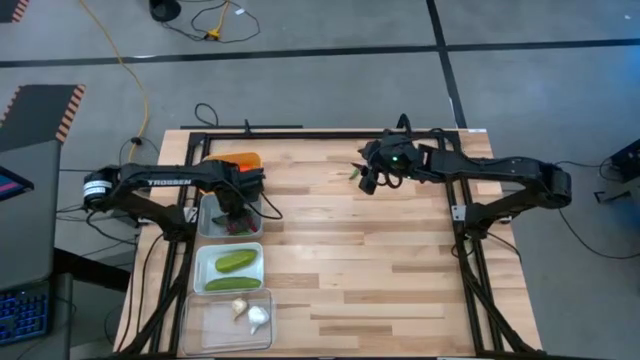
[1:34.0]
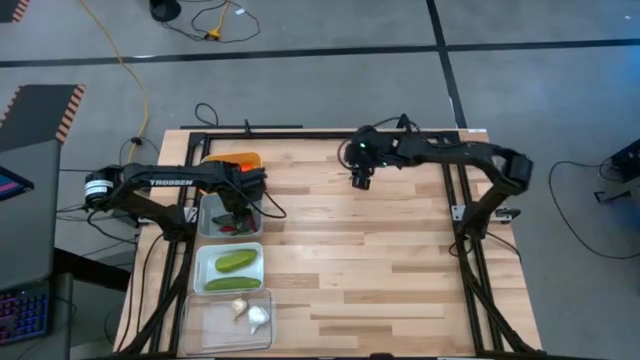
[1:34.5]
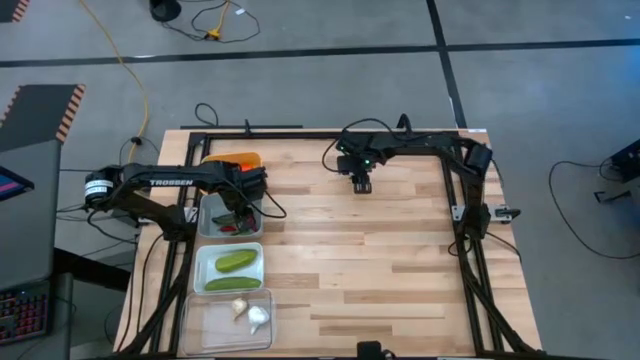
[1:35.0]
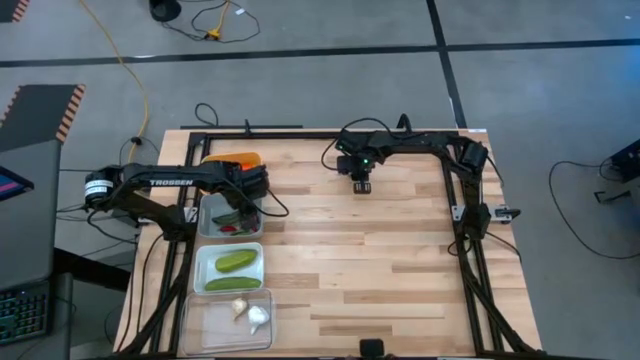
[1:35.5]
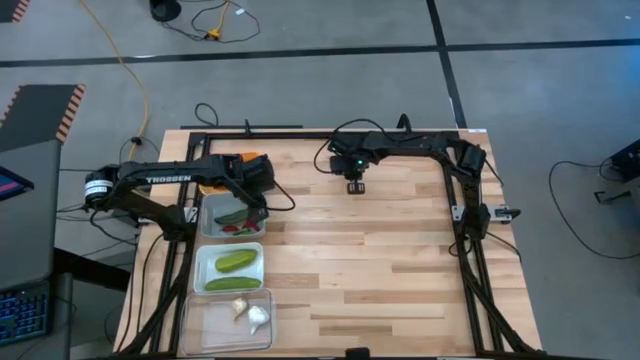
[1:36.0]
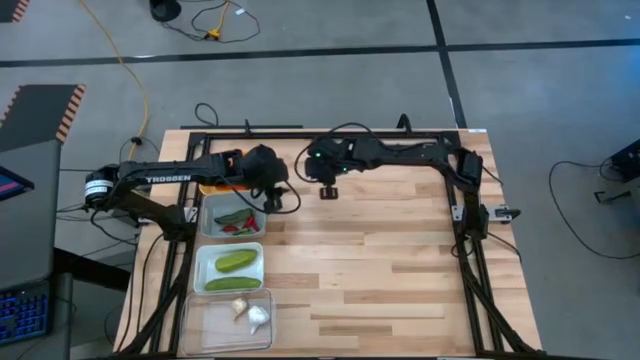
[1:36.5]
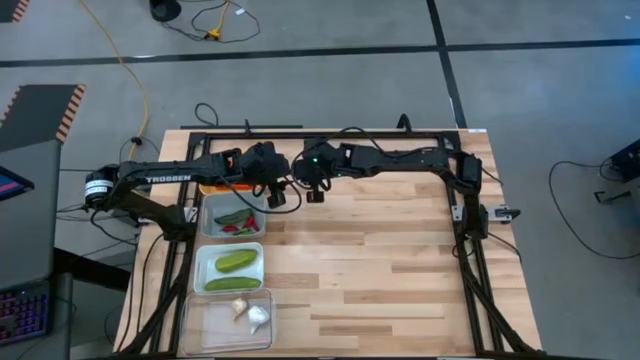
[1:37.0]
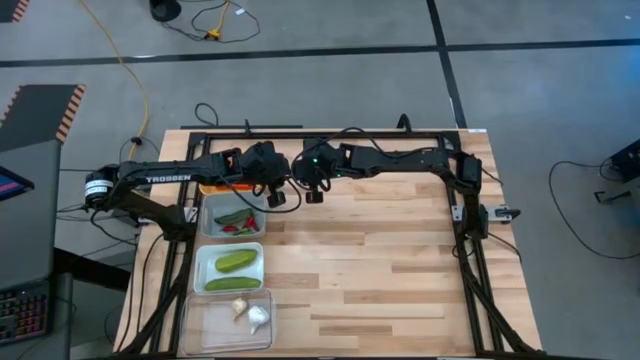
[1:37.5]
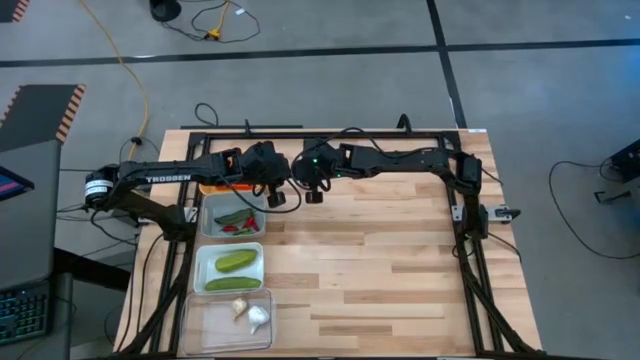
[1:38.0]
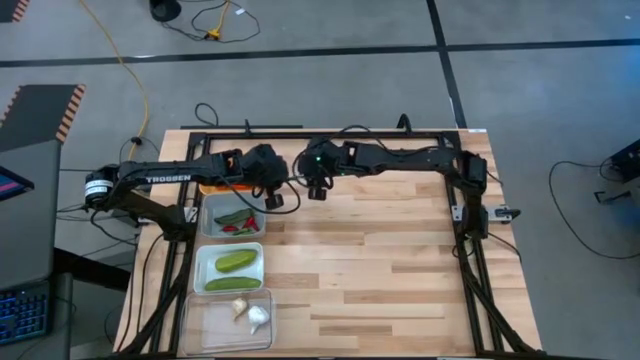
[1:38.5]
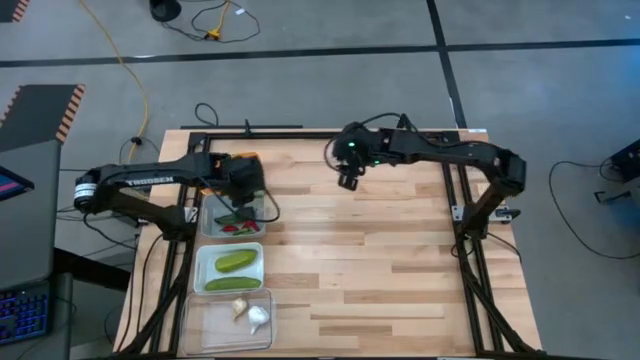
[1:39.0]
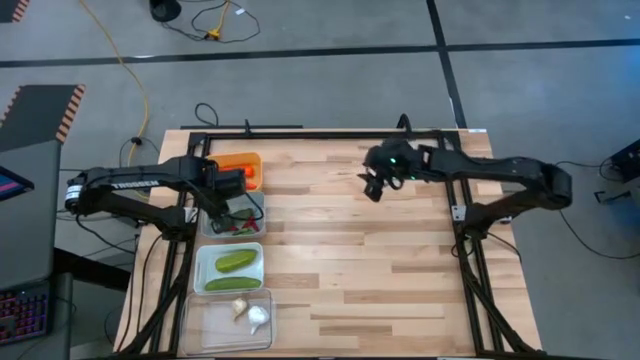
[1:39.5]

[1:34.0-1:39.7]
Task: Sort produce into baskets
Put the green chili into the gray bin

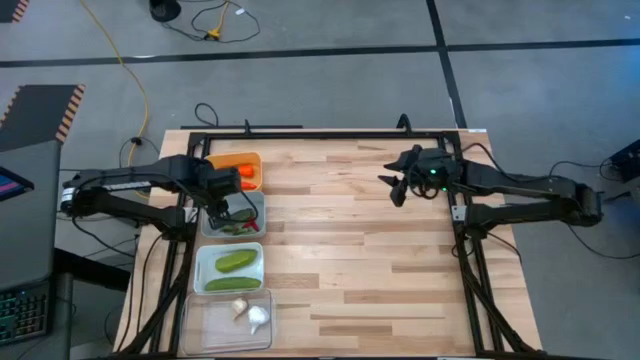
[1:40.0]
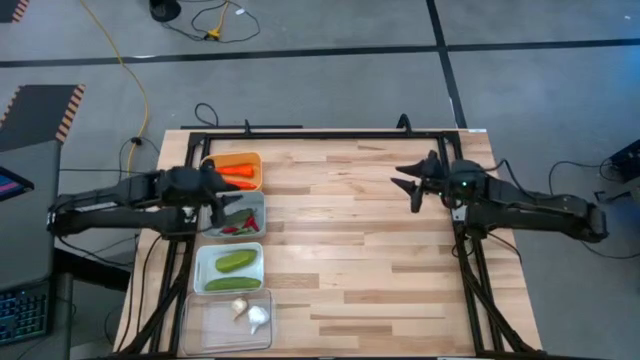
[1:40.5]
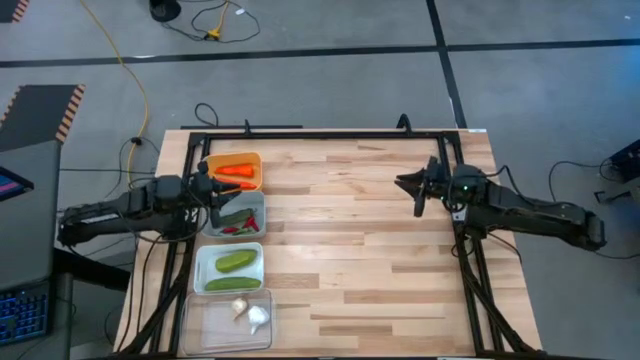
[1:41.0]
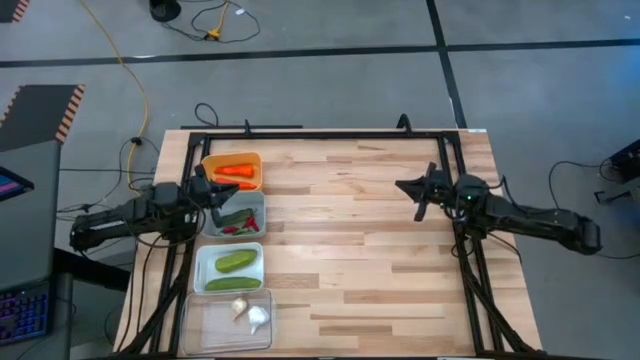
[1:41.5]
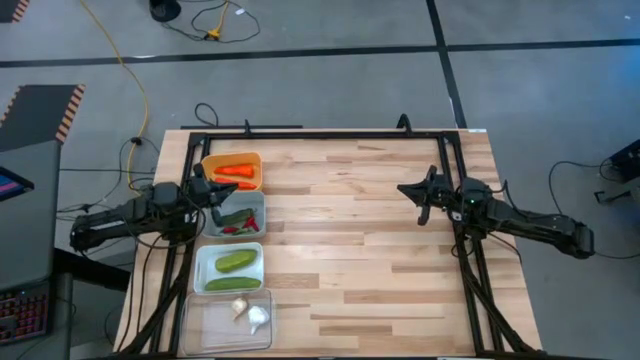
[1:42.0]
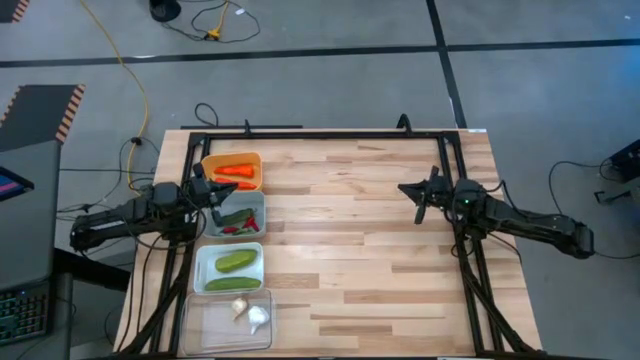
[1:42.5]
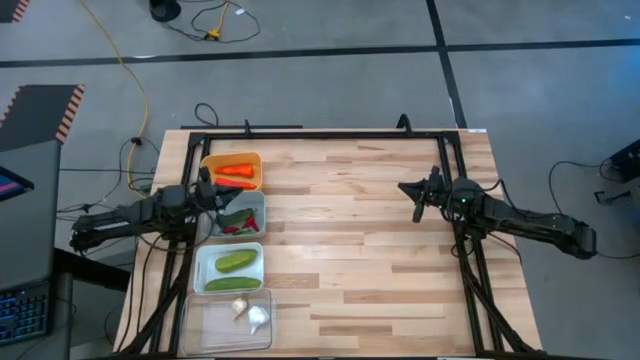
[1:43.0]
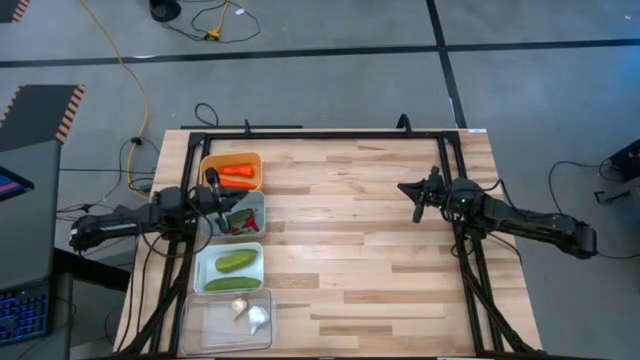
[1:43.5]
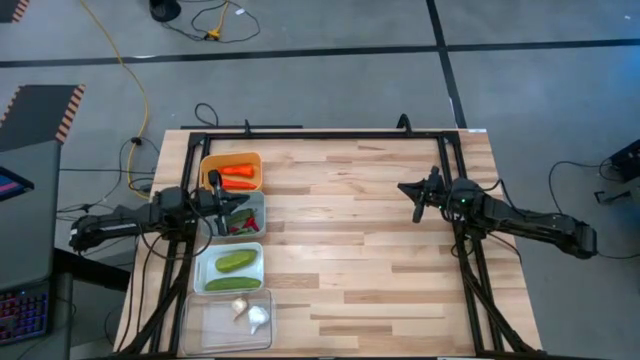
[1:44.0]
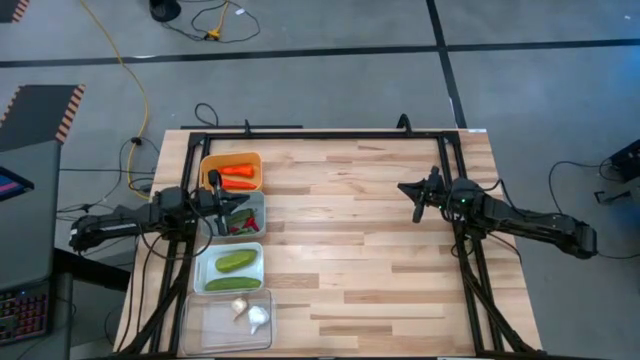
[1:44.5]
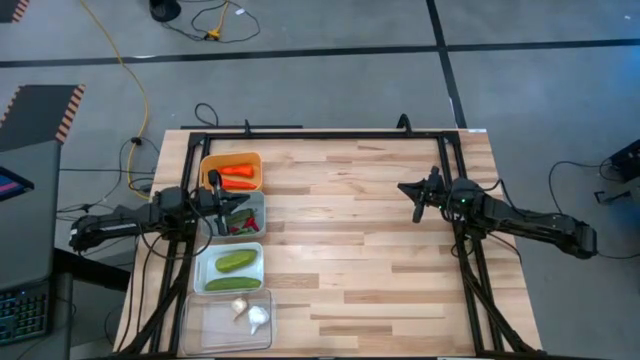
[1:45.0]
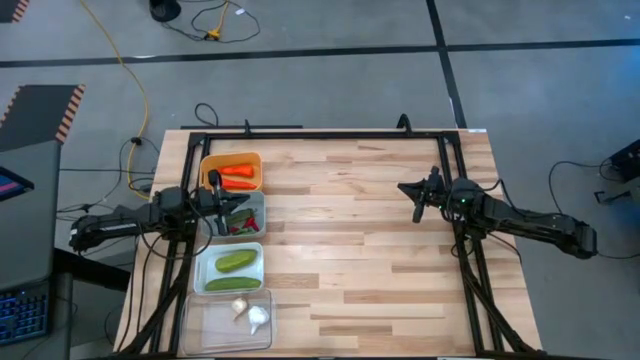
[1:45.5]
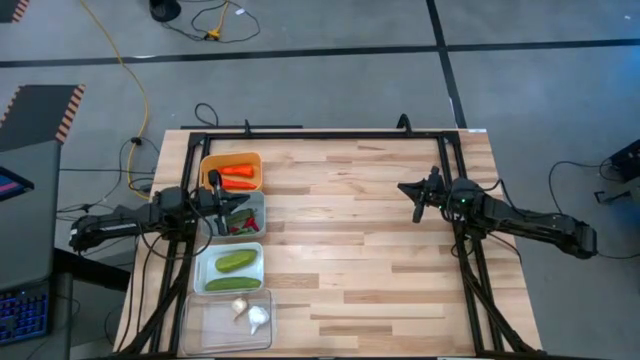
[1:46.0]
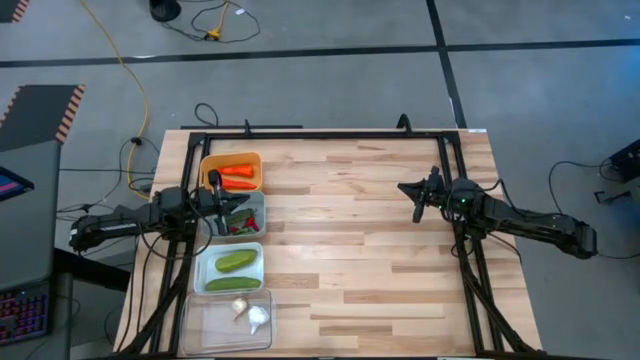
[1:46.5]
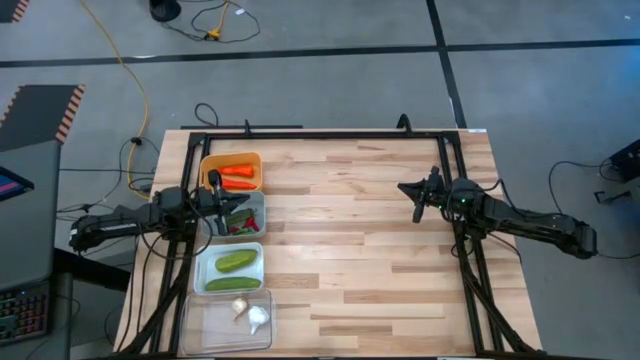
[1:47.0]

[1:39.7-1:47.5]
Return to Home Position

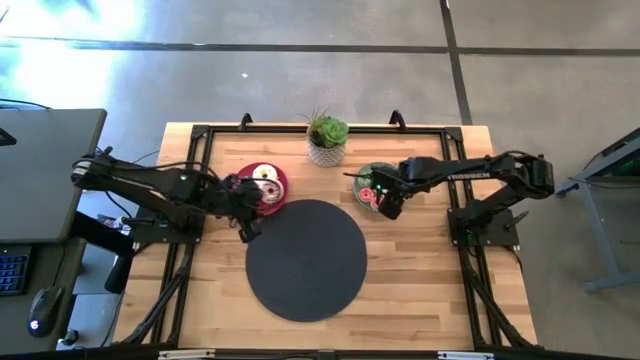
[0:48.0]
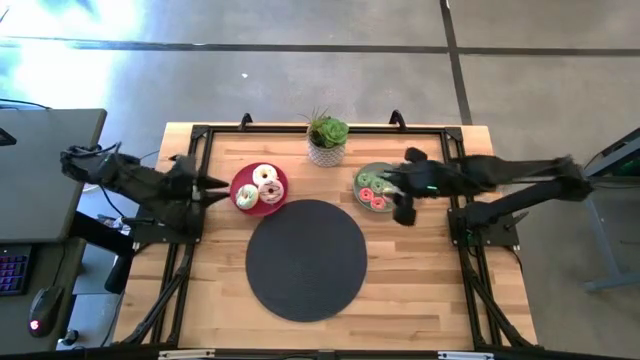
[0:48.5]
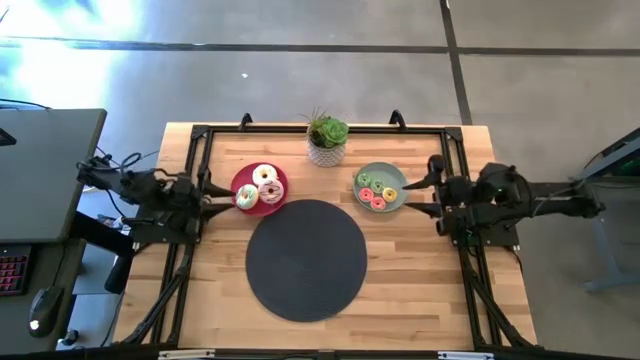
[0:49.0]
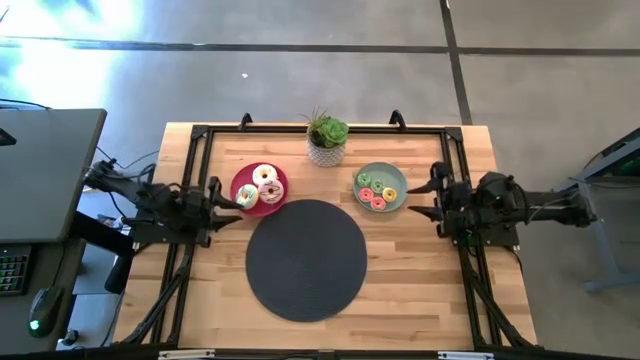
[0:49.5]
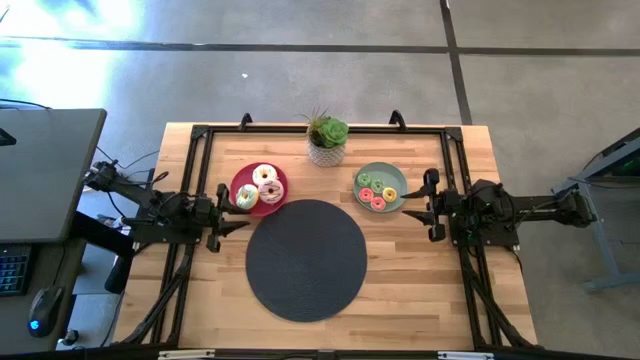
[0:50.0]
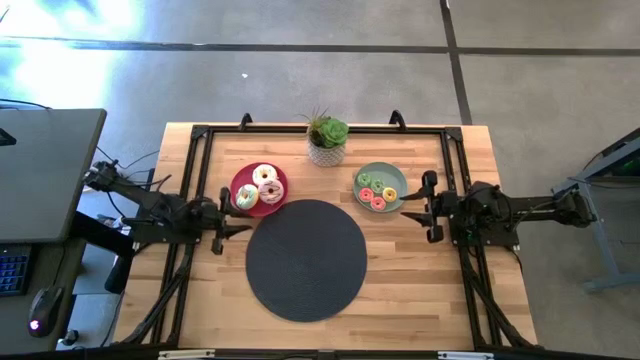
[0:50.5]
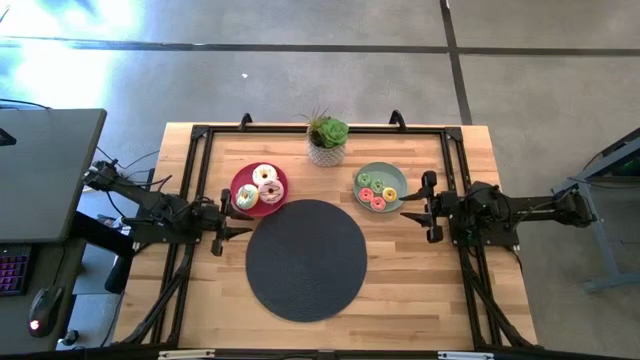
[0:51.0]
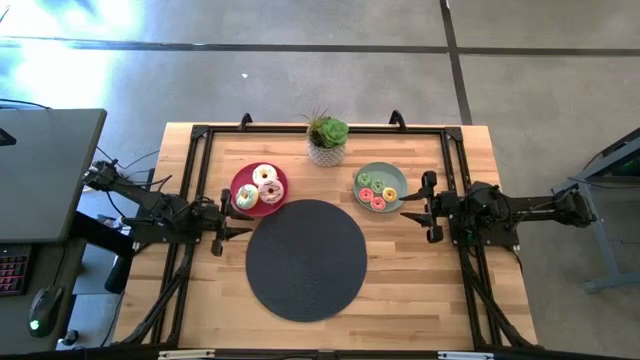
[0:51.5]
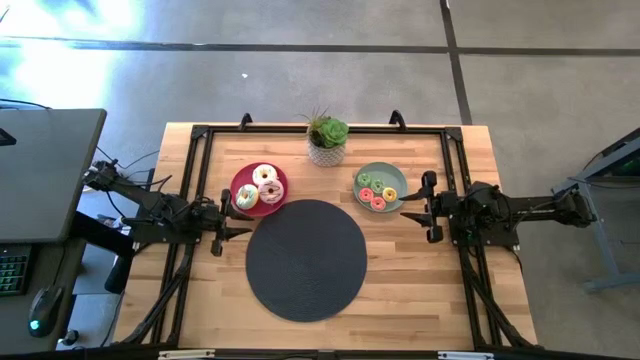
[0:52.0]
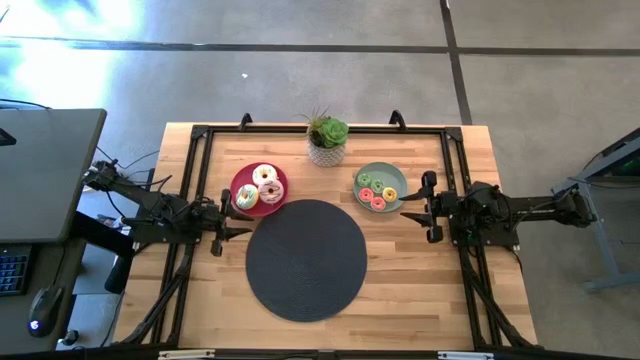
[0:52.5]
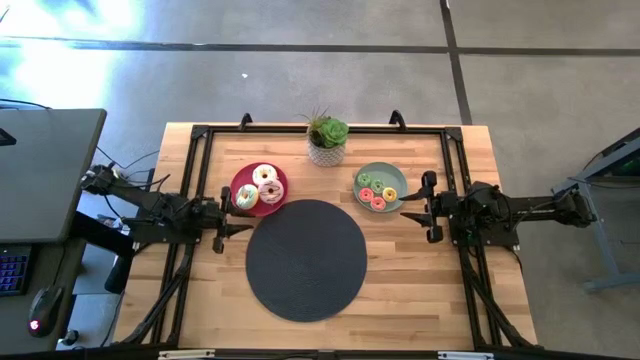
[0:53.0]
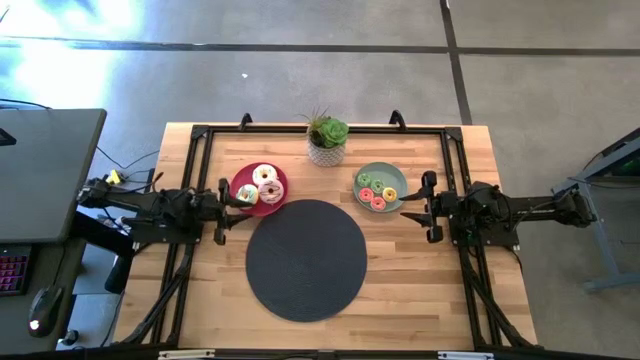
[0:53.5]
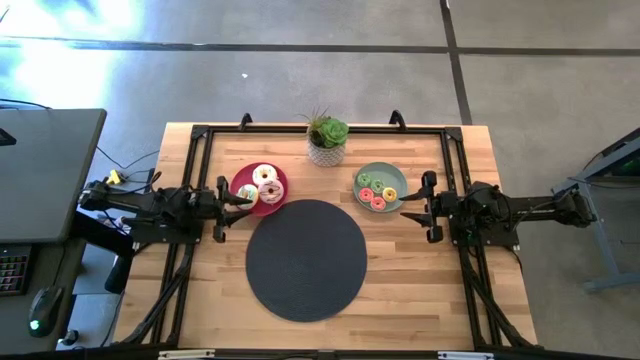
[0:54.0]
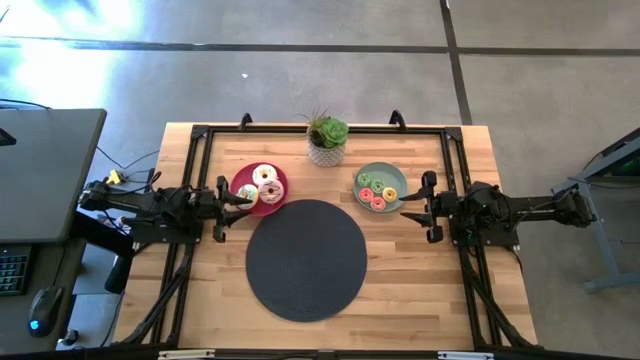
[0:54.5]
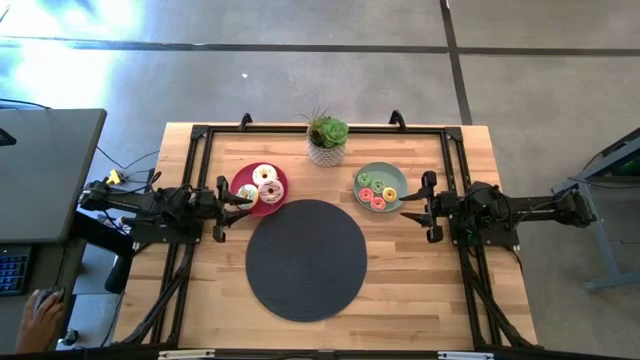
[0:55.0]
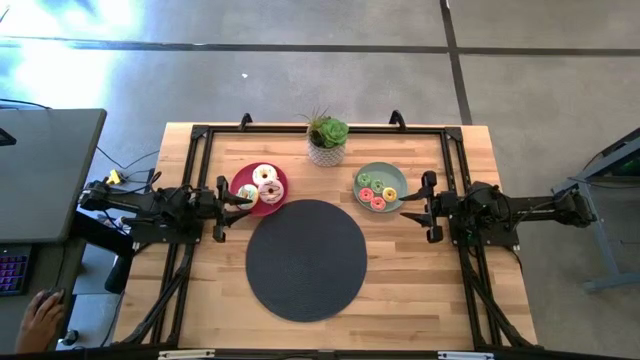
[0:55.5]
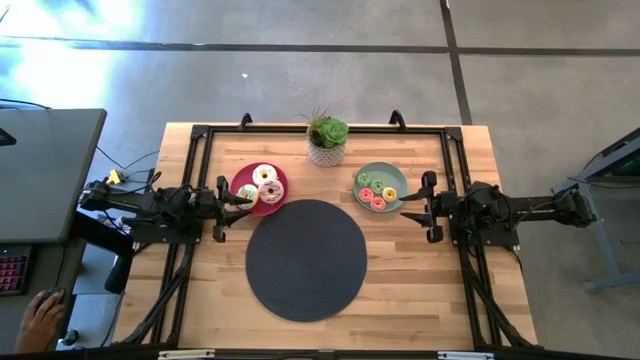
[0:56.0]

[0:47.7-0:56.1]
Task: Pick & Place donuts
Return to home position
